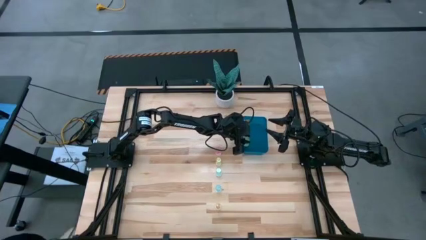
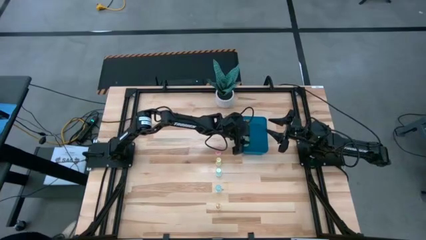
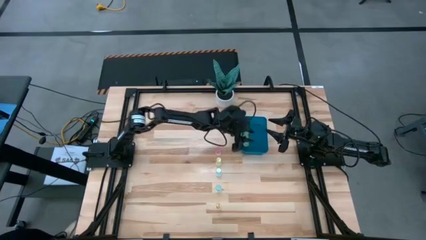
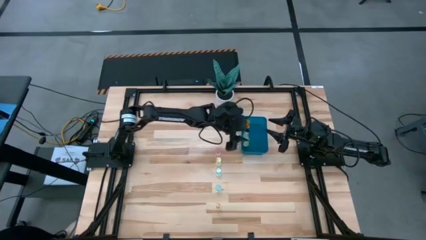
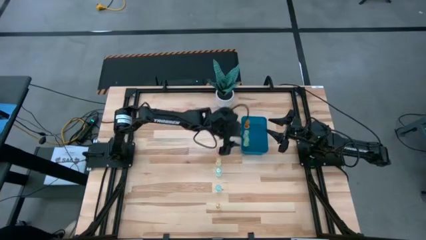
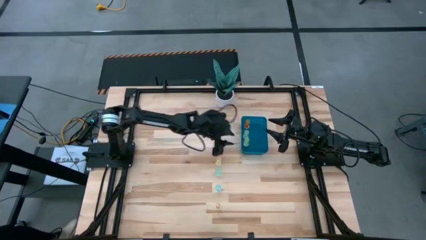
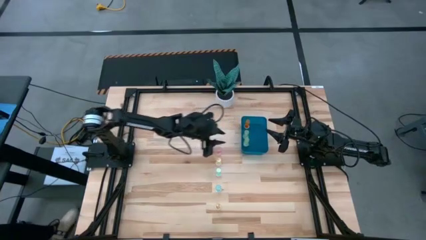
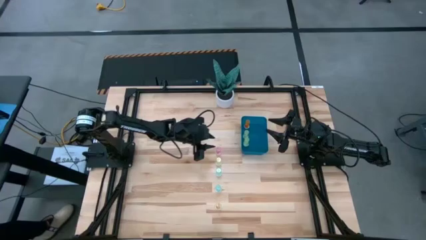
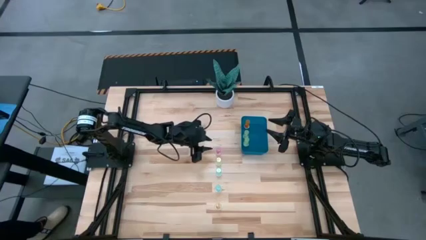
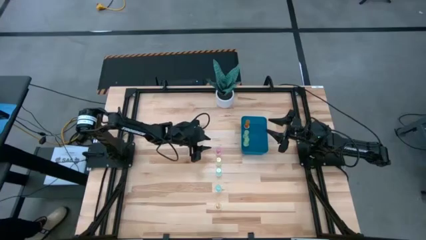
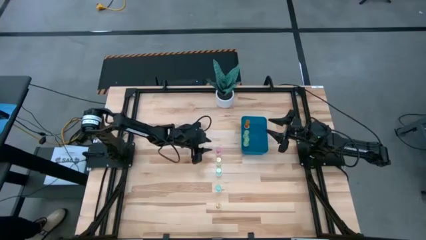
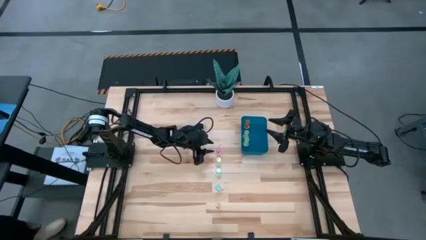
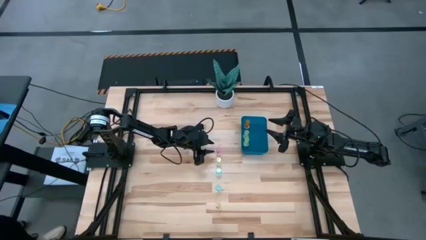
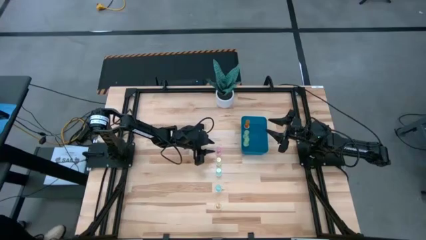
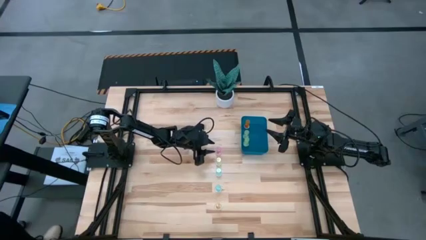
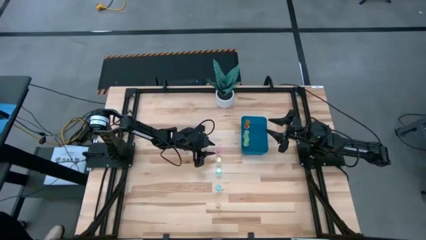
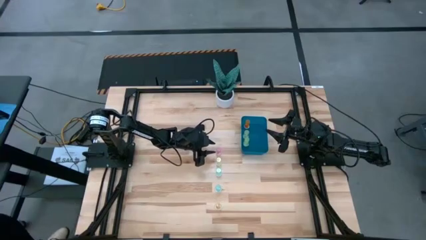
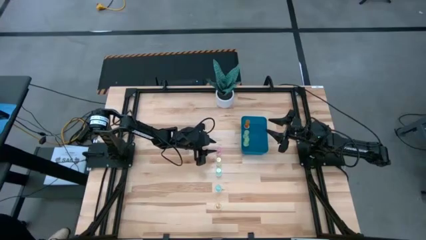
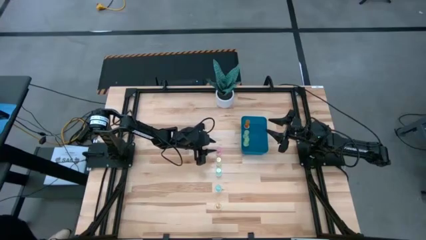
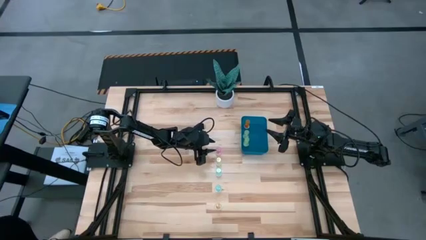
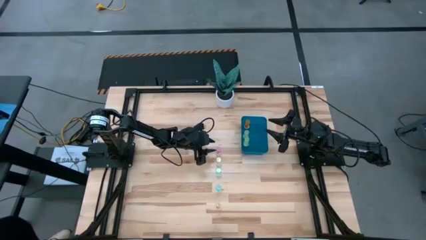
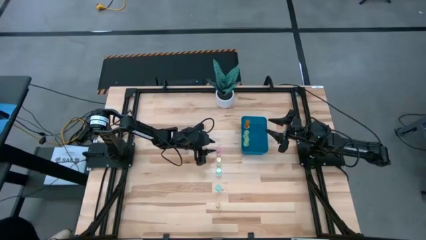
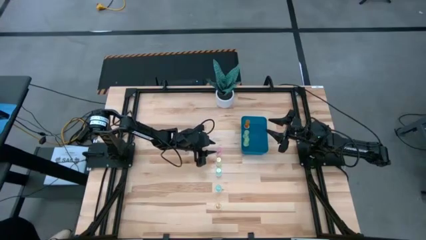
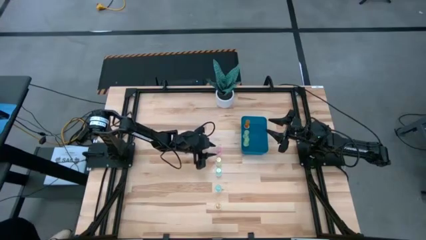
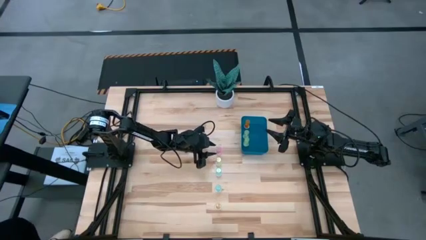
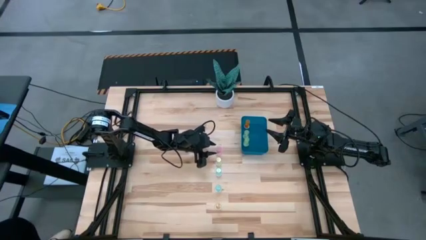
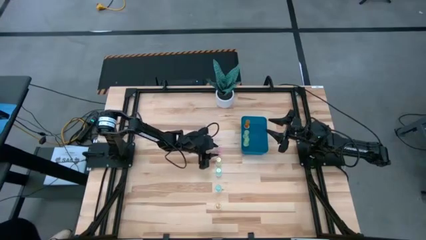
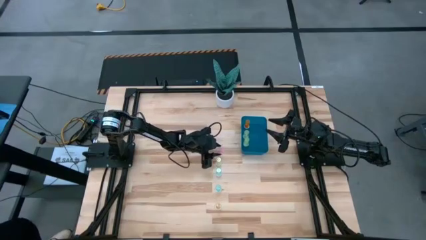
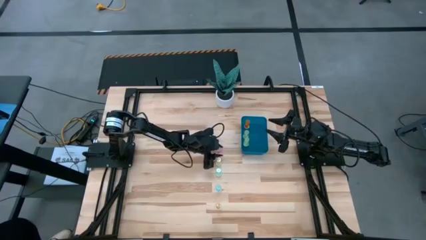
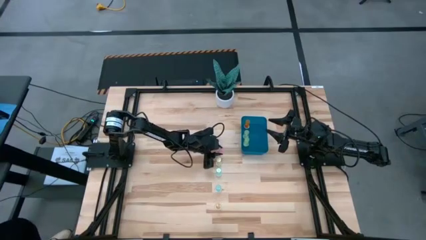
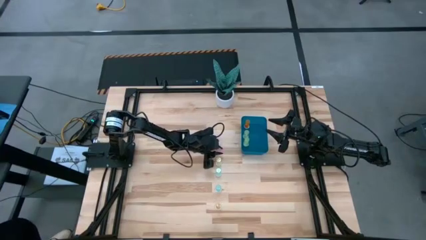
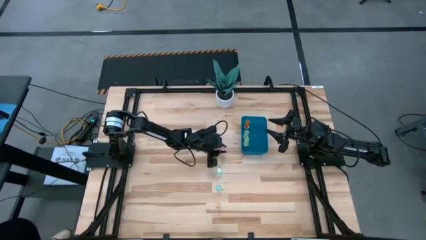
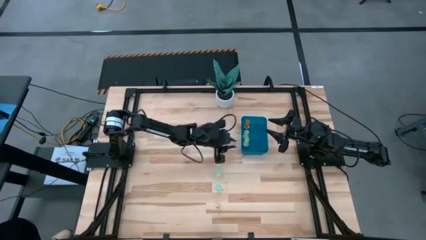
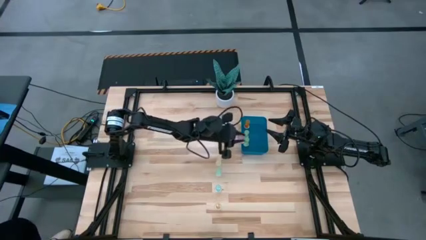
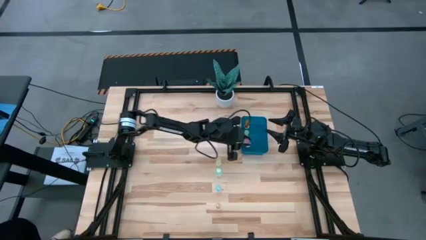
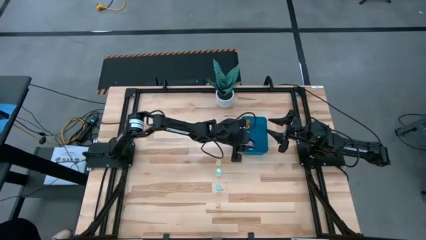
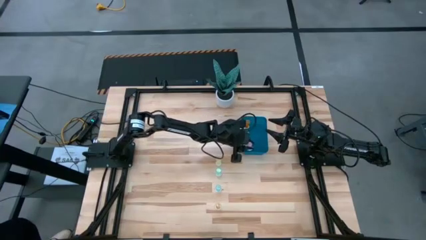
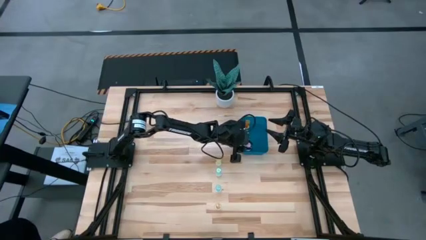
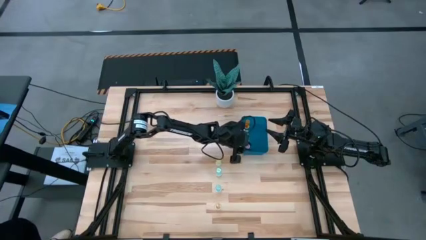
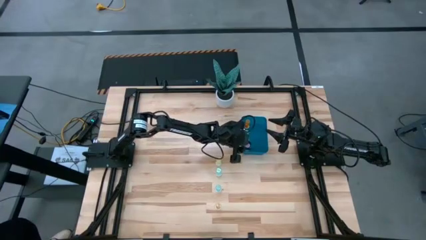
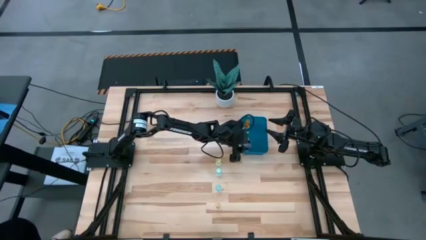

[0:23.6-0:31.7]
Task: Pick and place pill bottles into a basket
Put the pink pill bottle into the blue bin

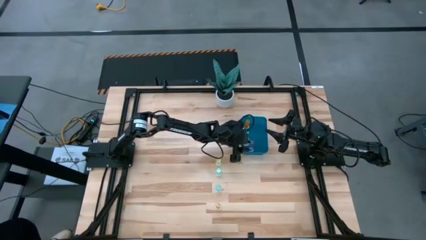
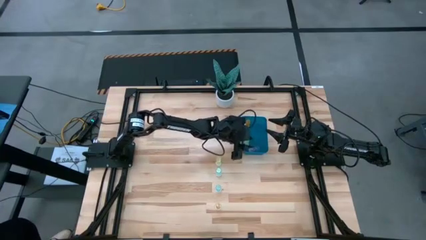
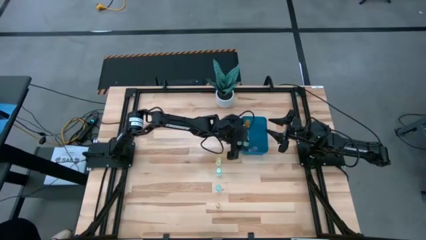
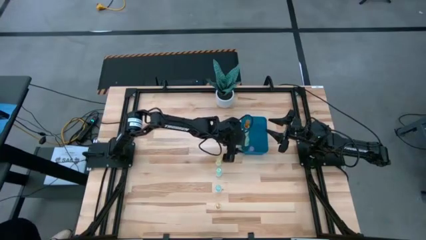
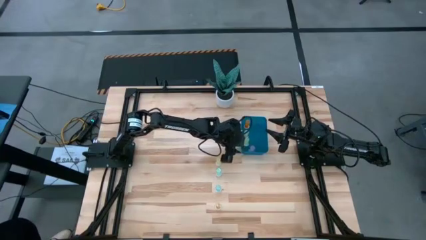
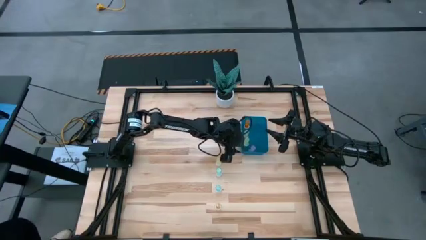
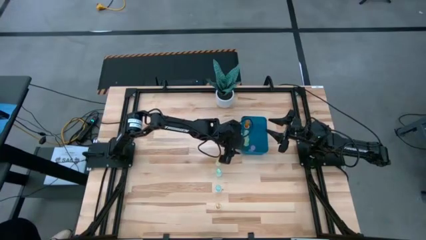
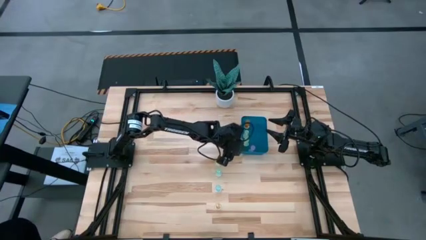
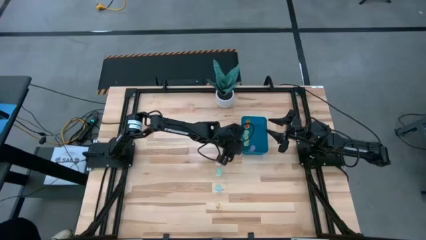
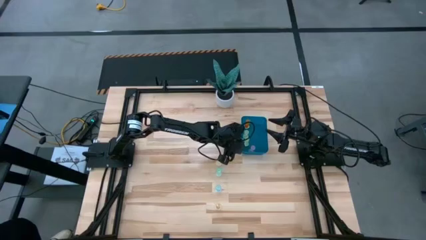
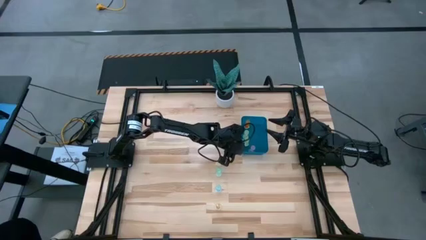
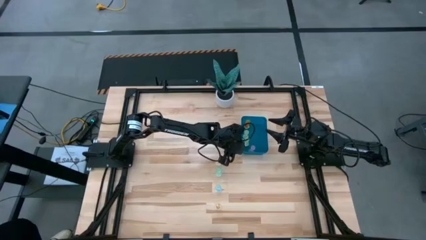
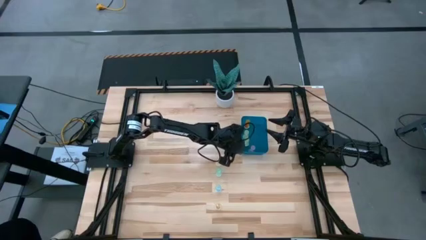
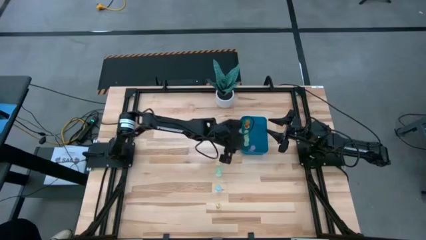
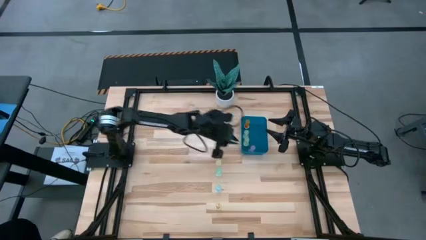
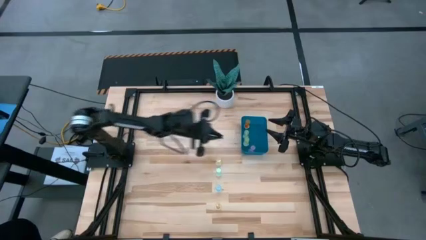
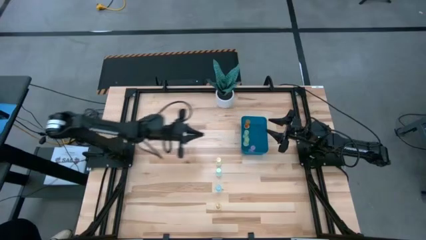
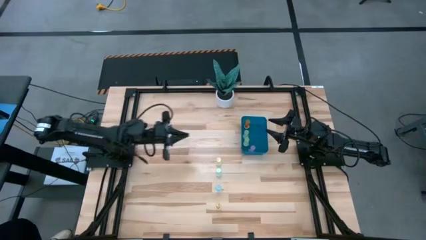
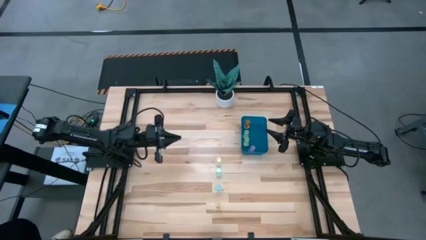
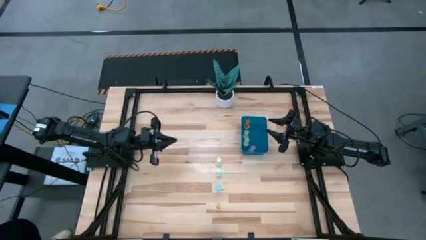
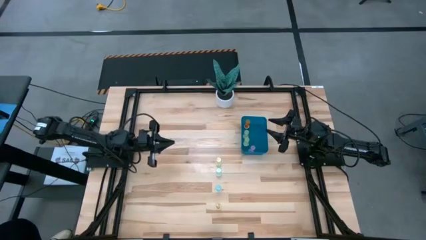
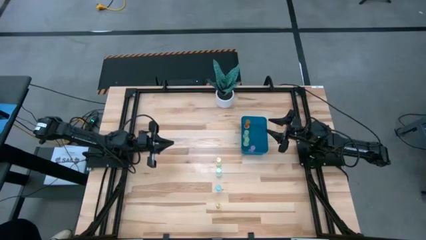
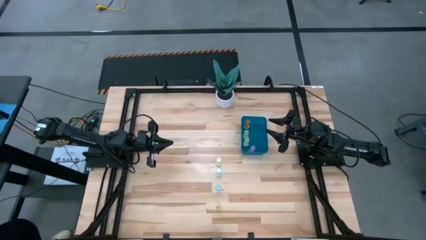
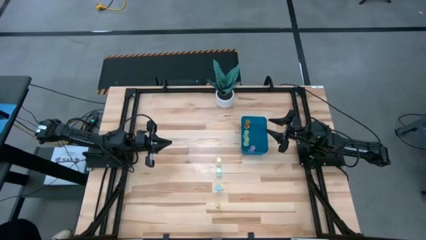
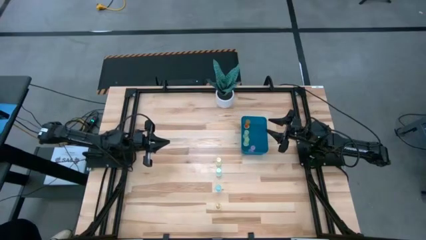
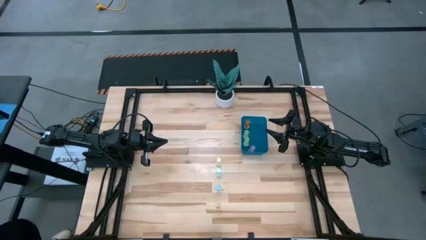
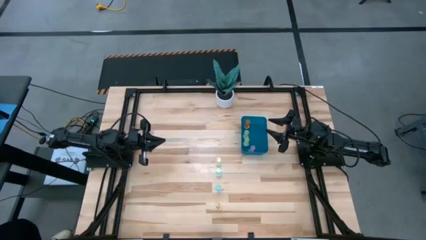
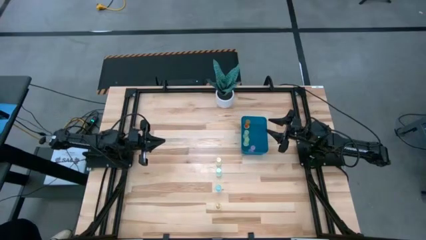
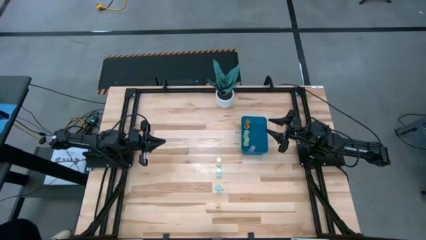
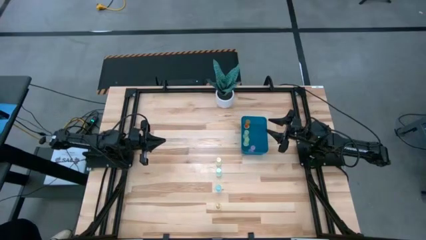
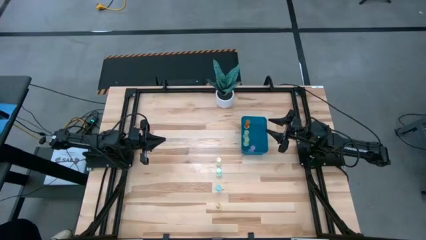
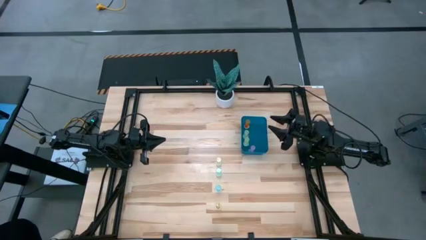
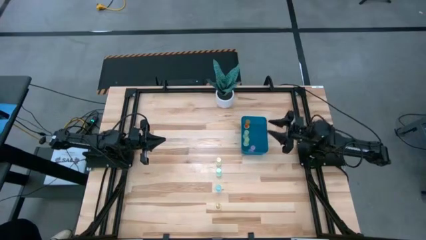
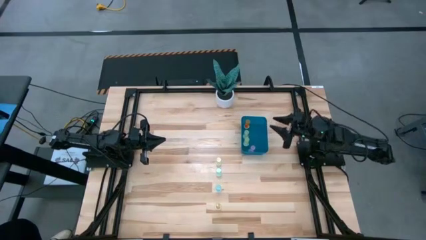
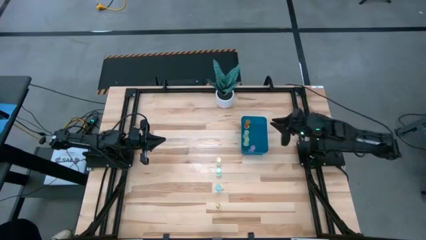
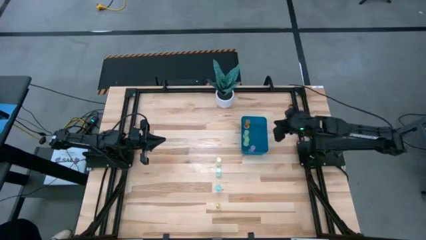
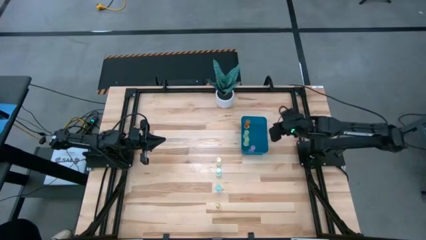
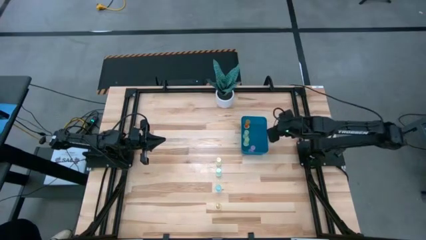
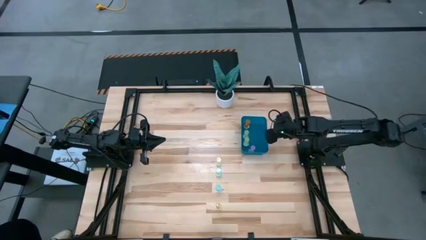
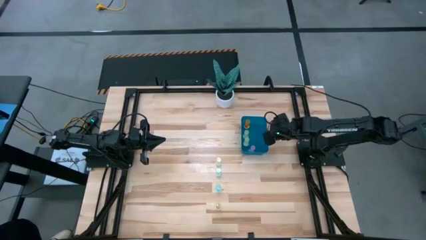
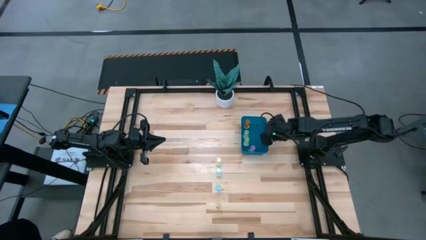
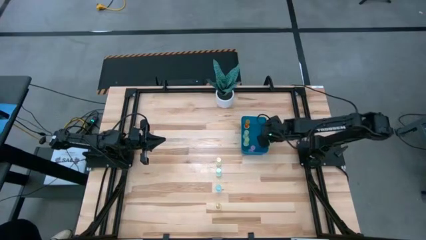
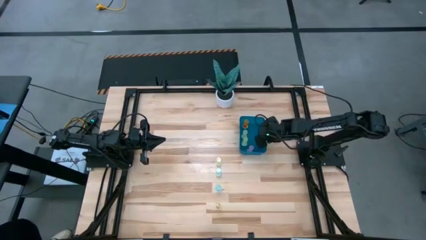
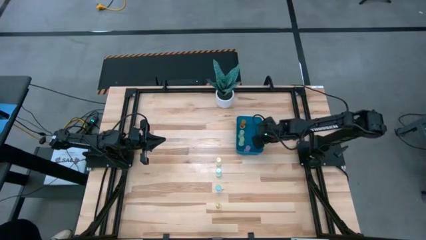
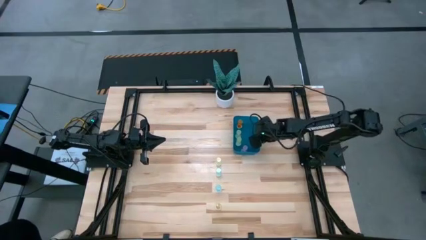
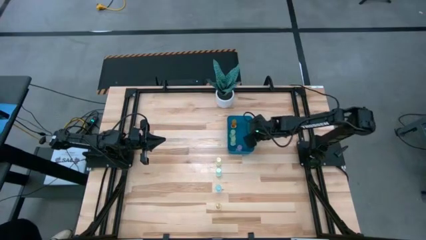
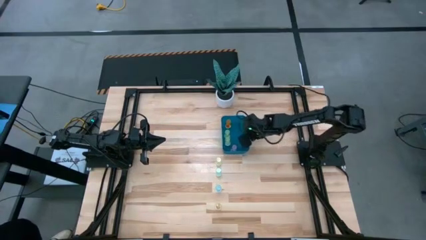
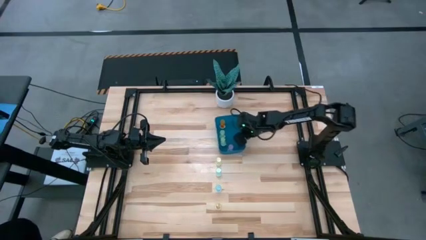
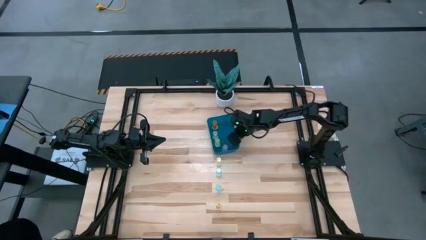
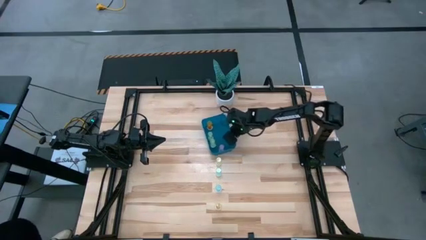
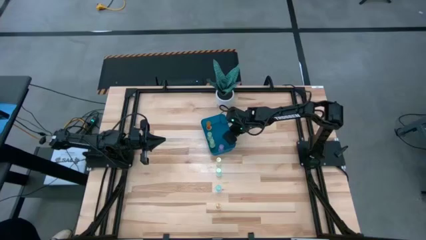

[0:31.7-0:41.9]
Move the blue bin to the center of the table
